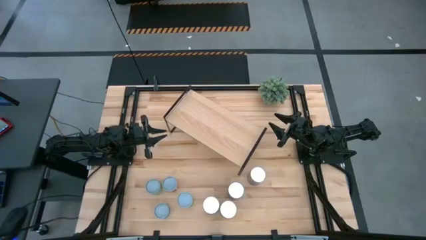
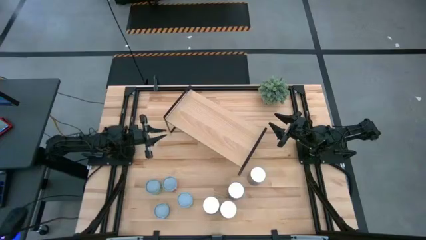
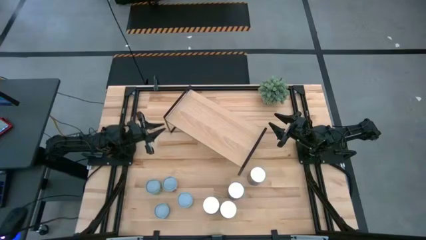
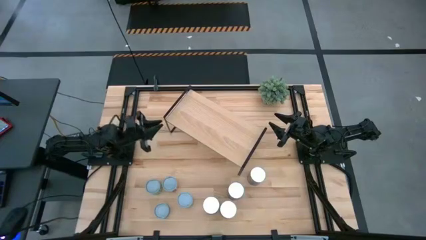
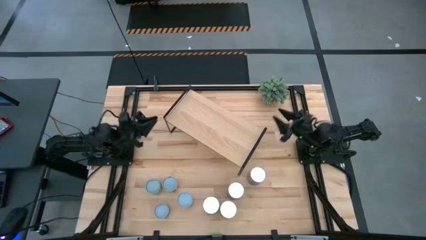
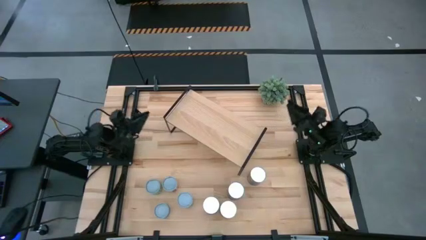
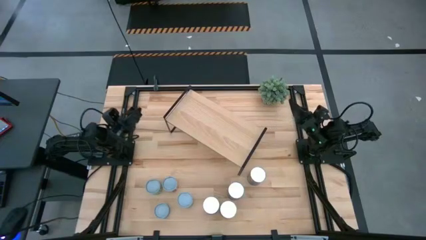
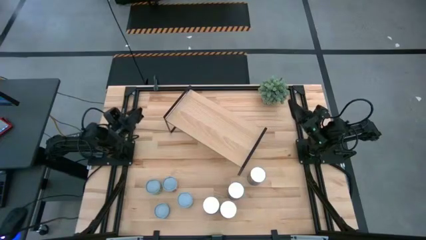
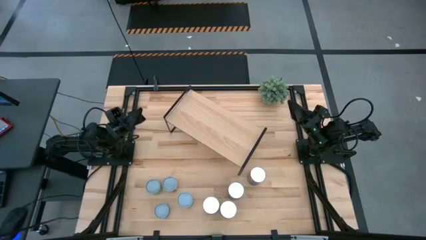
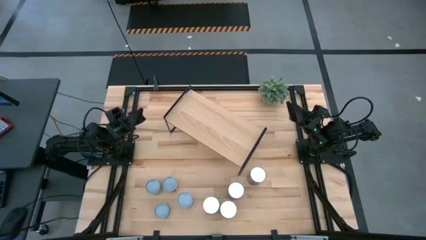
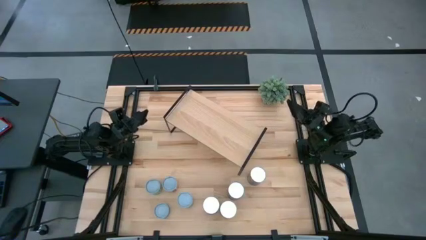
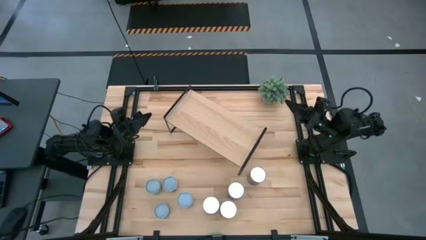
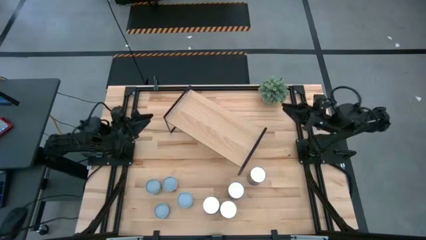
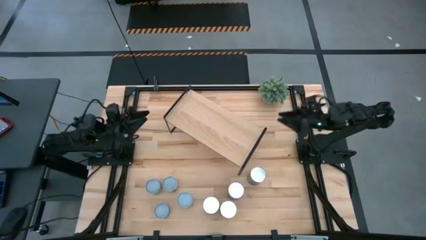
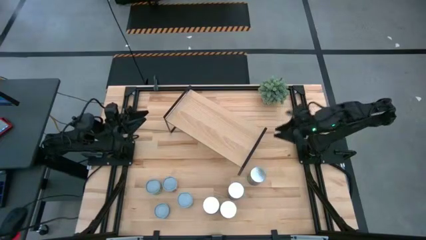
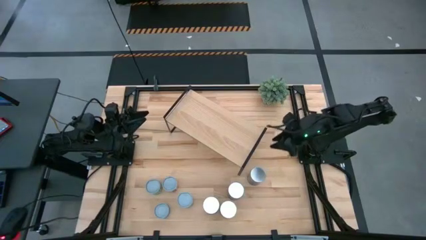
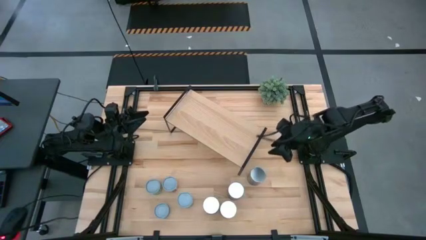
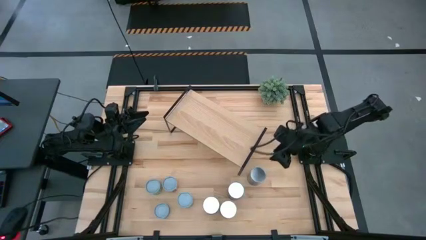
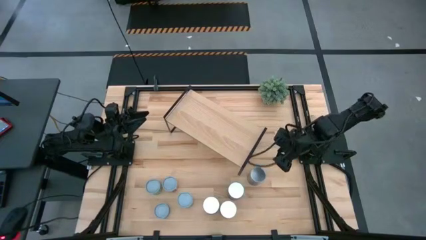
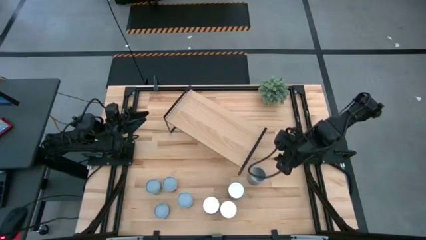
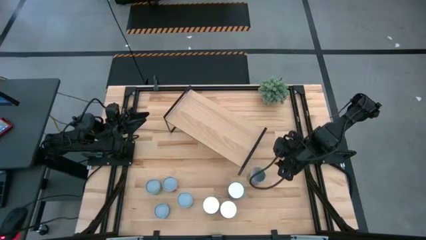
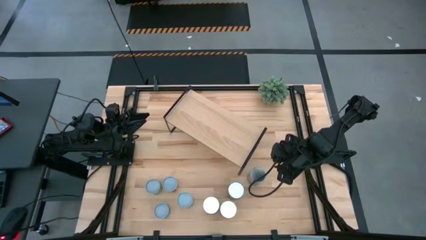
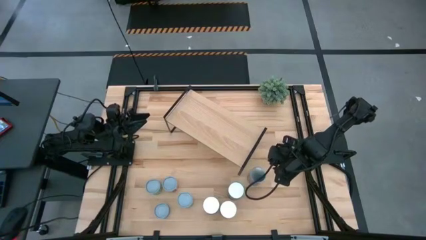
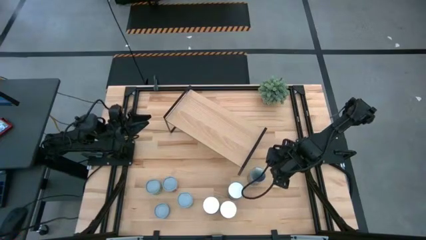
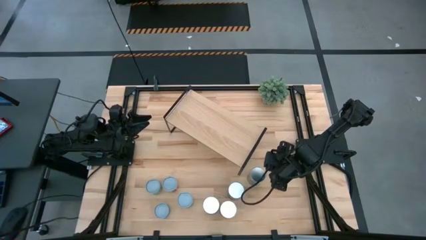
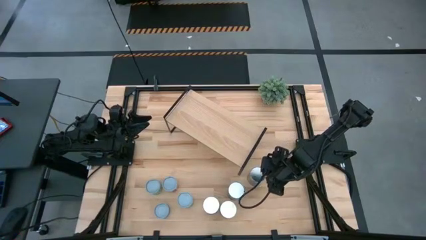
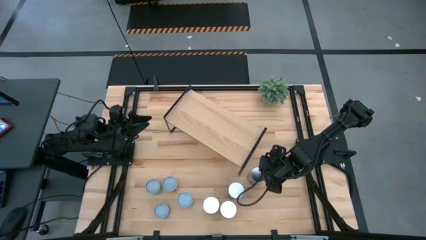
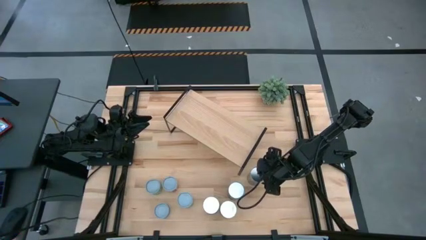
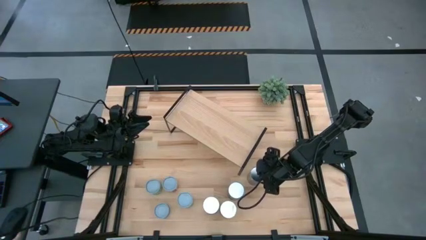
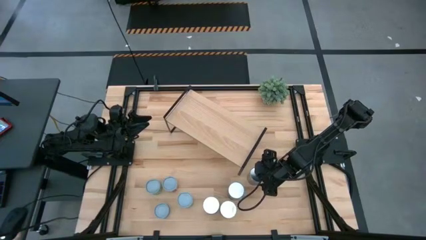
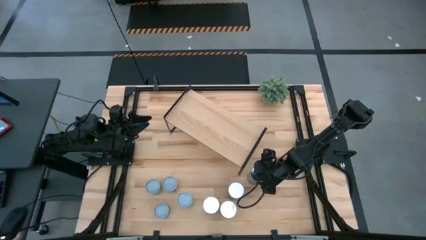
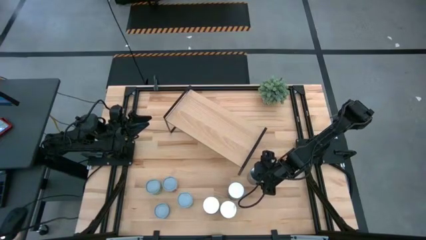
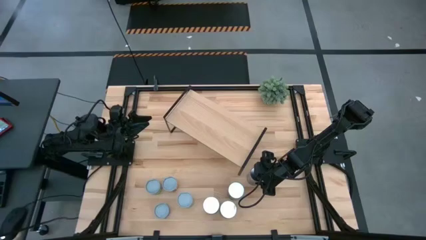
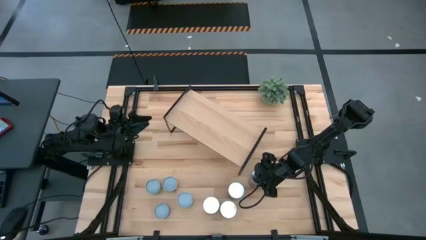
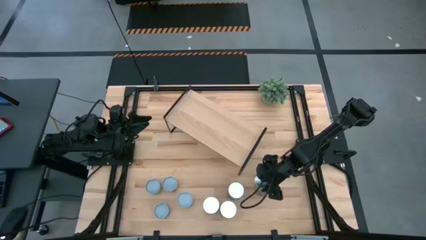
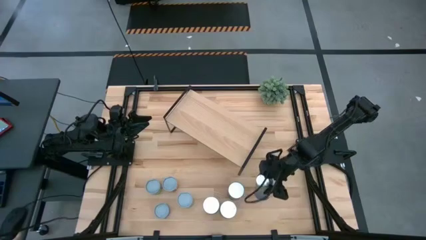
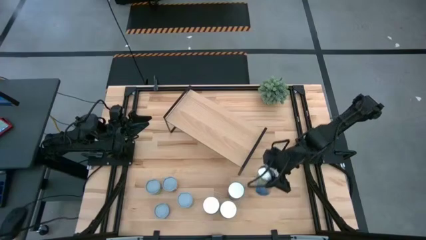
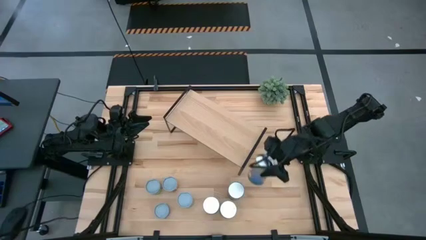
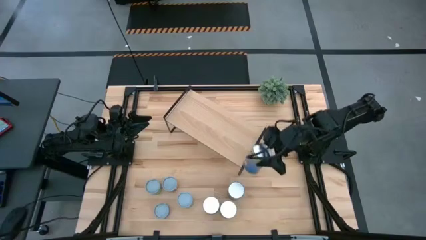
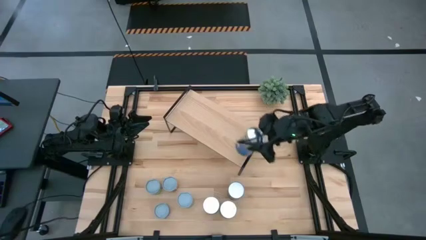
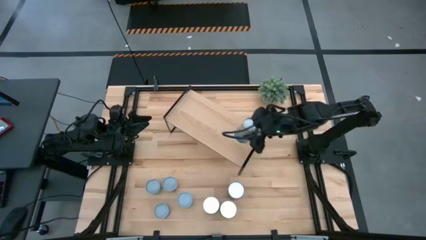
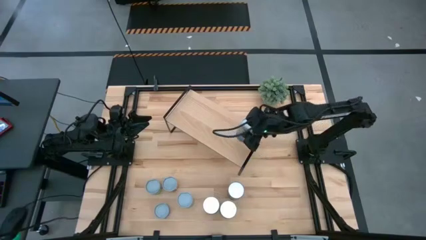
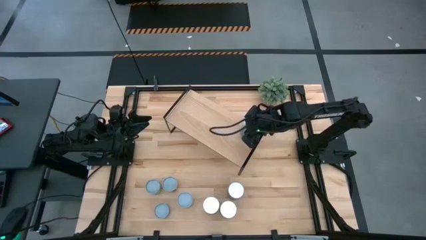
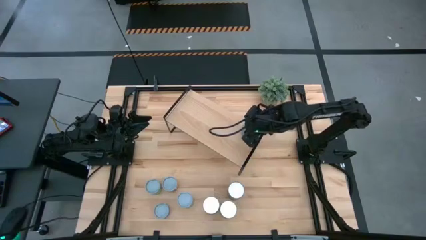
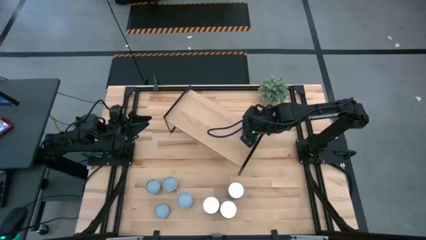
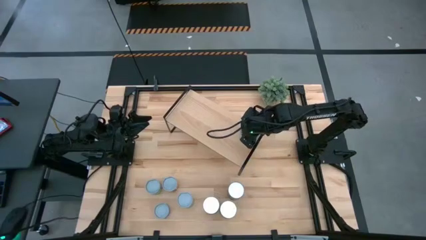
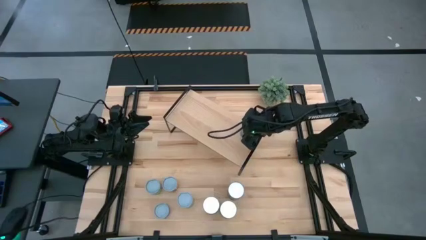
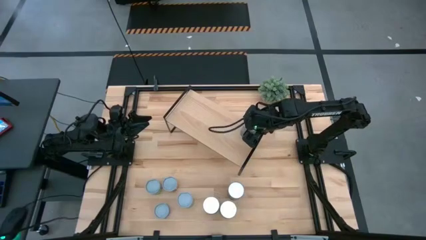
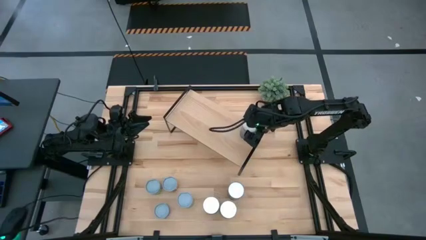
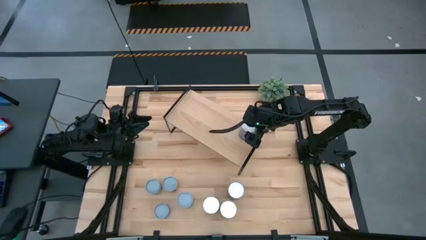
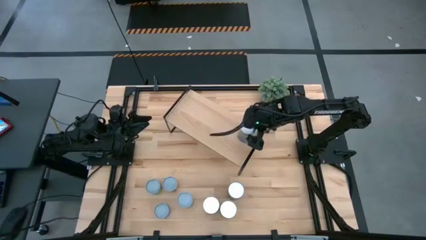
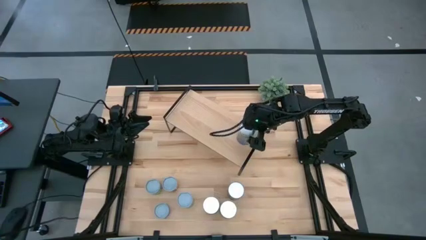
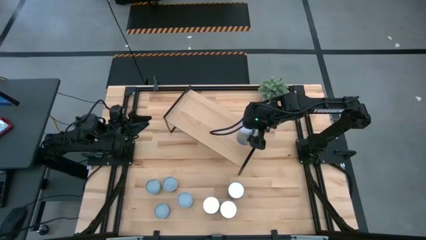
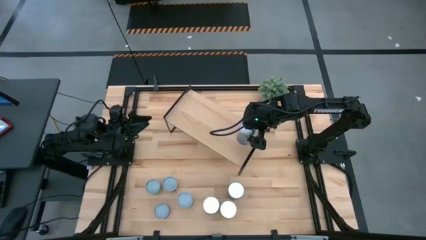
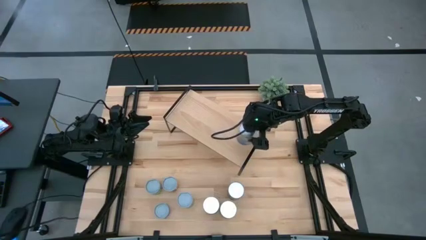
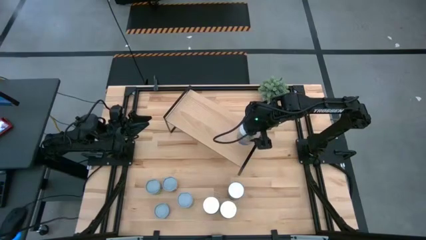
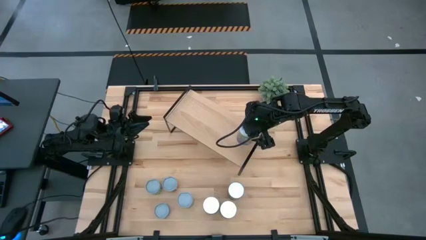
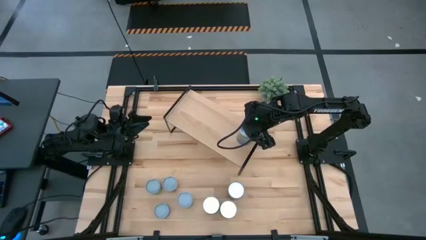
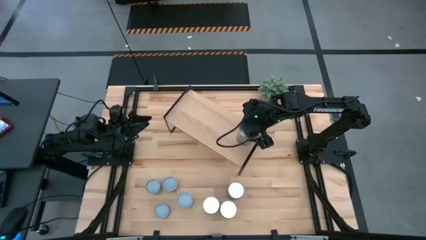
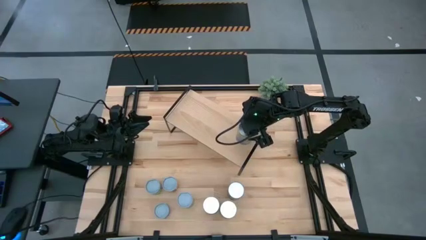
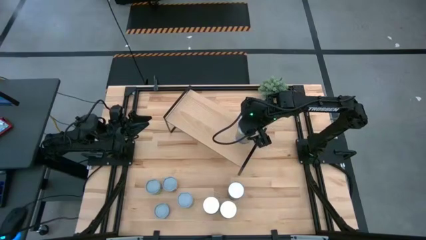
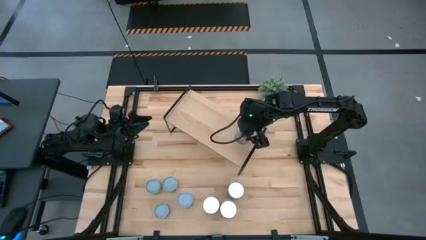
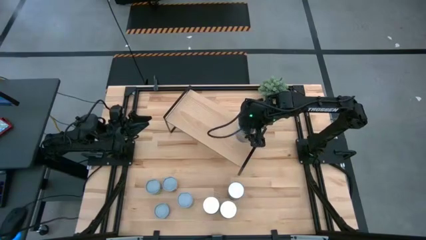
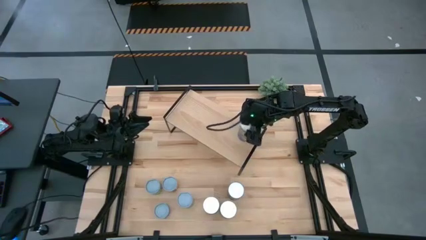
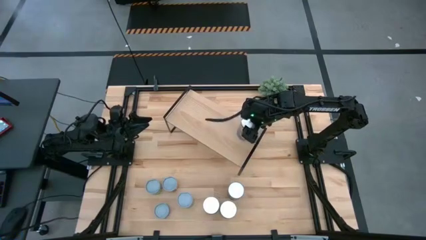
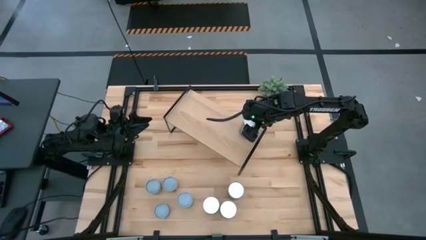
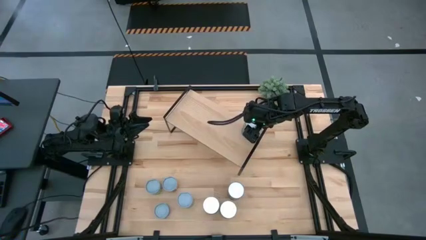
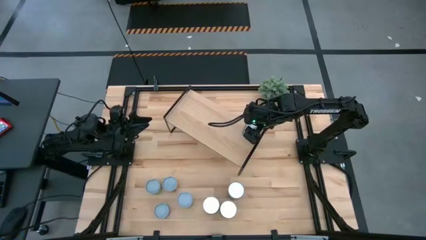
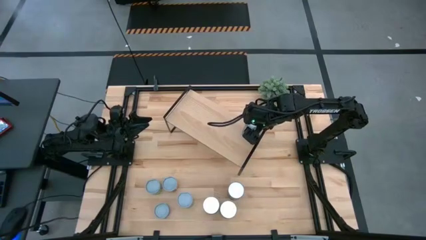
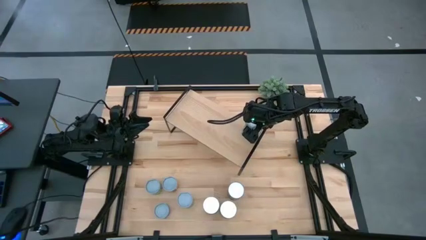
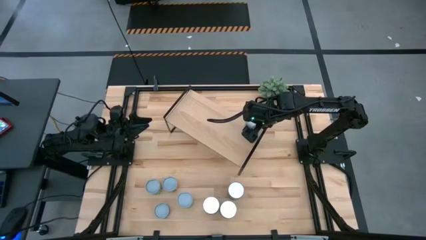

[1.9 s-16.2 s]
Task: Pick and place cans onto a shelf
Put the canned peaches on the shelf
